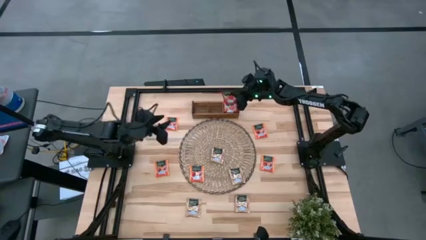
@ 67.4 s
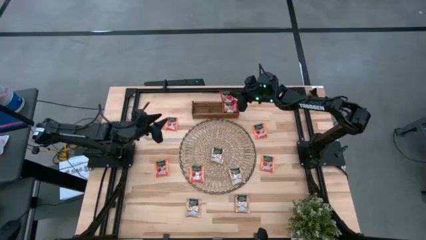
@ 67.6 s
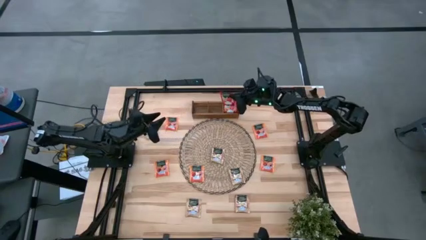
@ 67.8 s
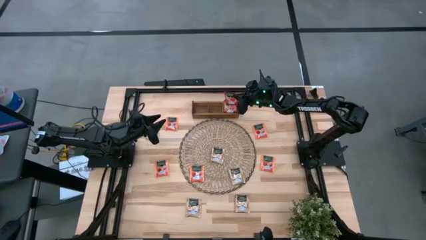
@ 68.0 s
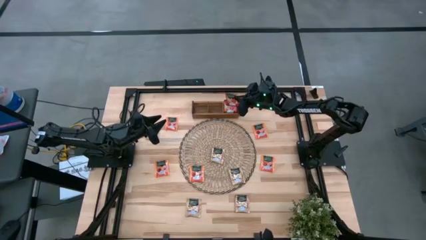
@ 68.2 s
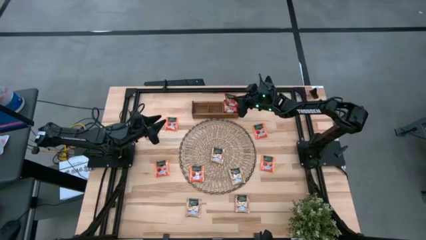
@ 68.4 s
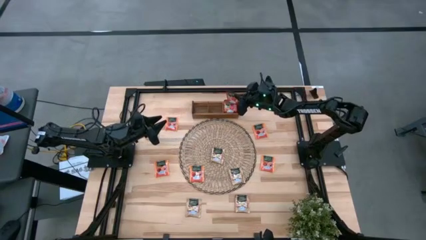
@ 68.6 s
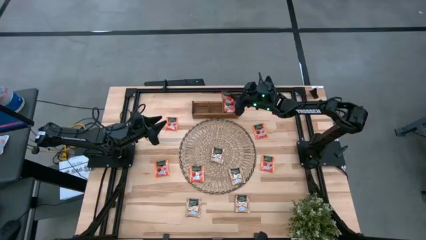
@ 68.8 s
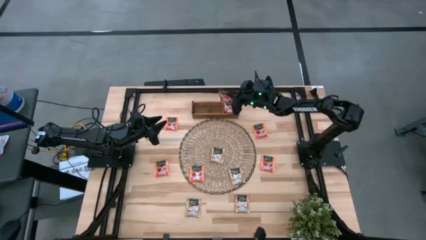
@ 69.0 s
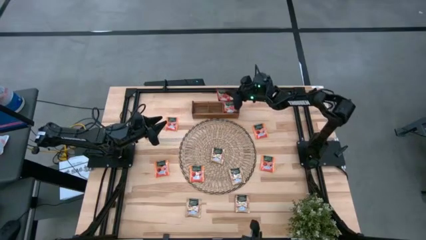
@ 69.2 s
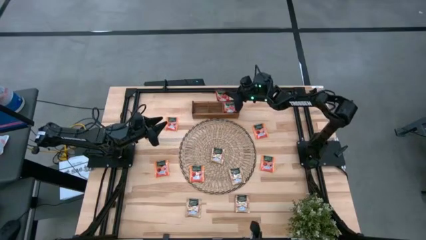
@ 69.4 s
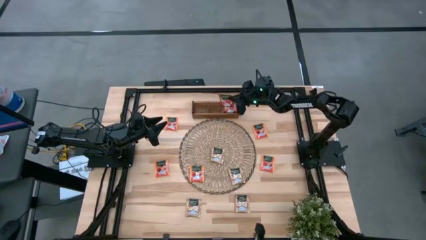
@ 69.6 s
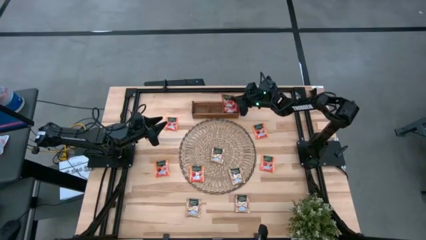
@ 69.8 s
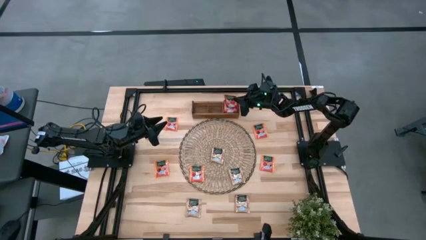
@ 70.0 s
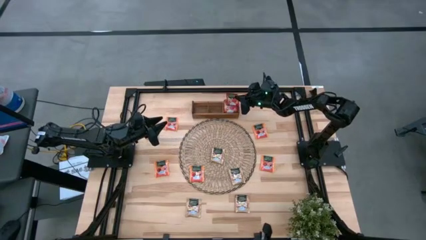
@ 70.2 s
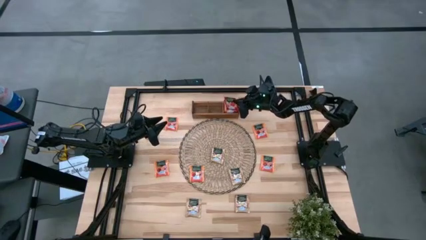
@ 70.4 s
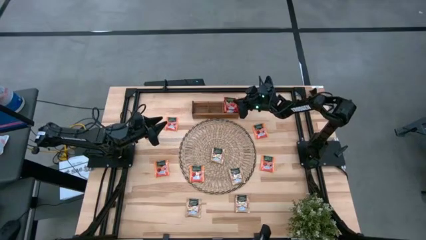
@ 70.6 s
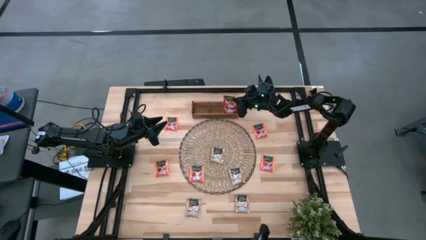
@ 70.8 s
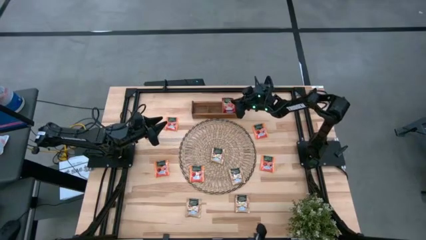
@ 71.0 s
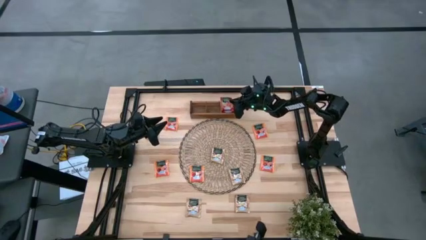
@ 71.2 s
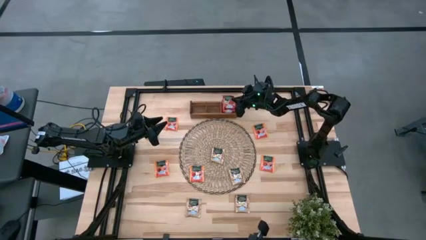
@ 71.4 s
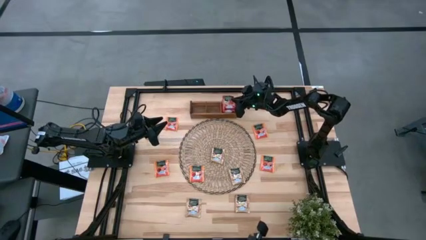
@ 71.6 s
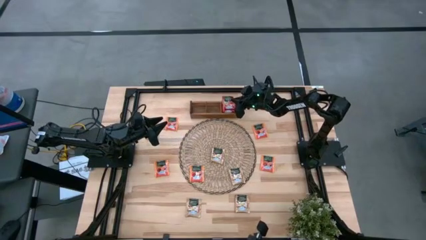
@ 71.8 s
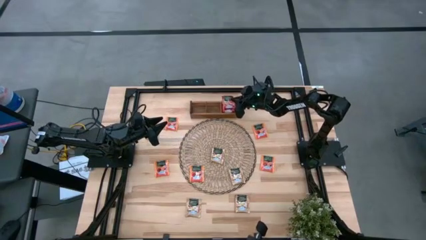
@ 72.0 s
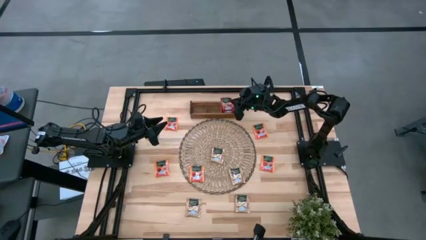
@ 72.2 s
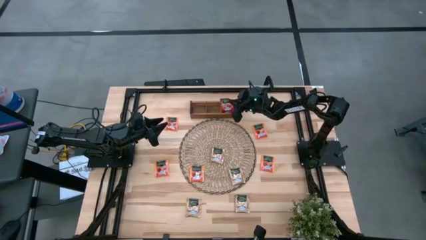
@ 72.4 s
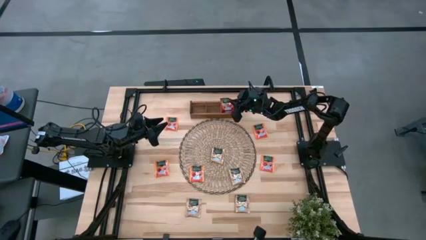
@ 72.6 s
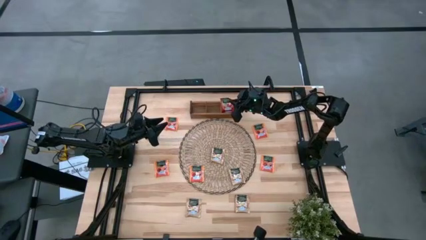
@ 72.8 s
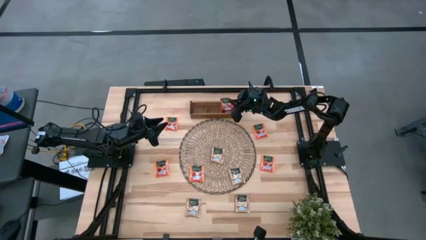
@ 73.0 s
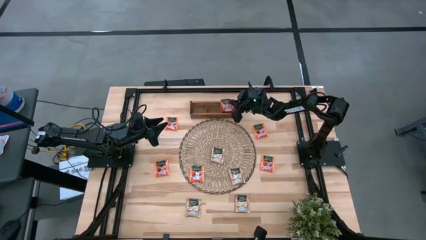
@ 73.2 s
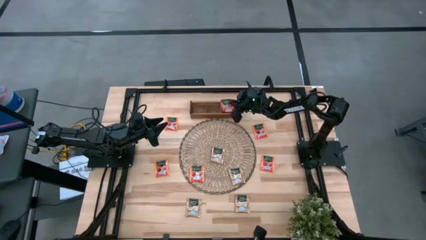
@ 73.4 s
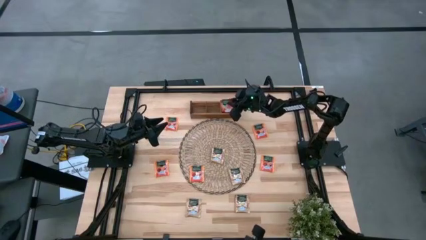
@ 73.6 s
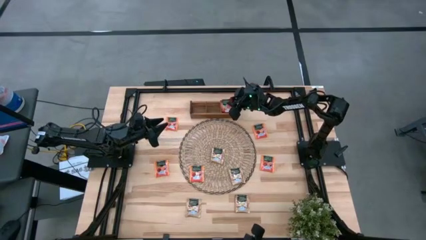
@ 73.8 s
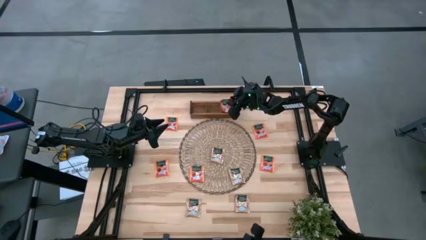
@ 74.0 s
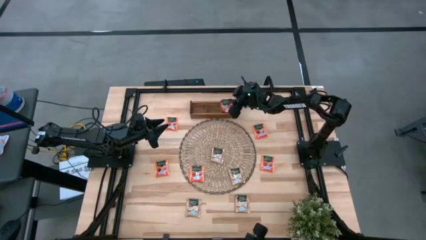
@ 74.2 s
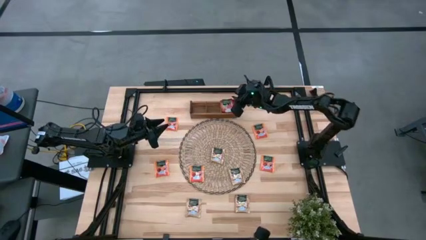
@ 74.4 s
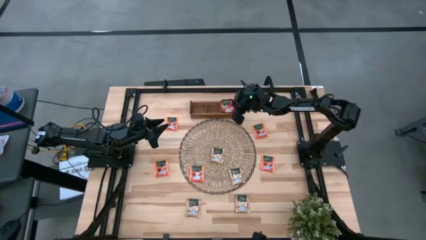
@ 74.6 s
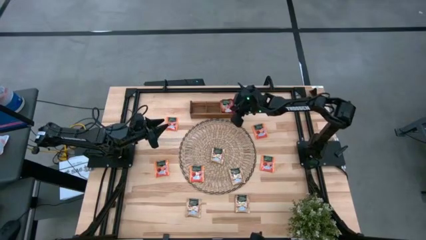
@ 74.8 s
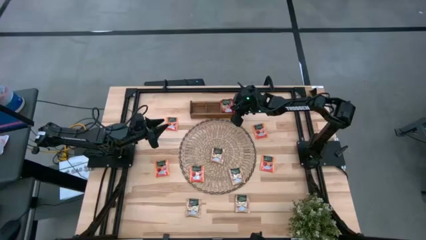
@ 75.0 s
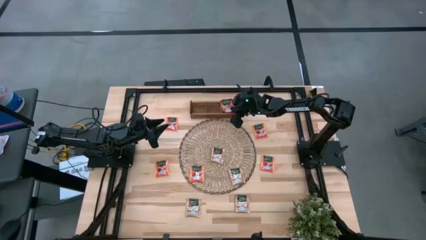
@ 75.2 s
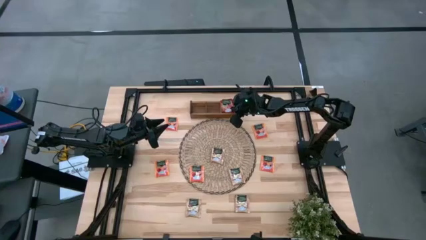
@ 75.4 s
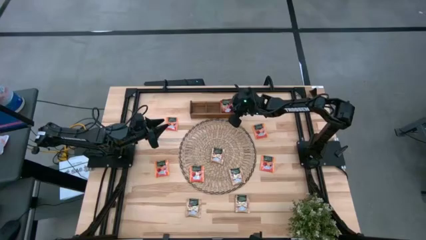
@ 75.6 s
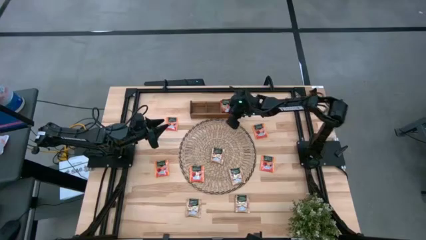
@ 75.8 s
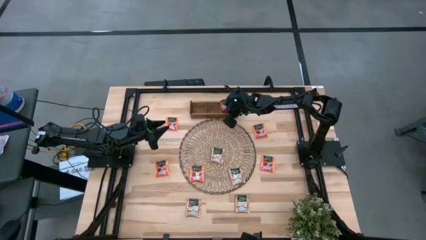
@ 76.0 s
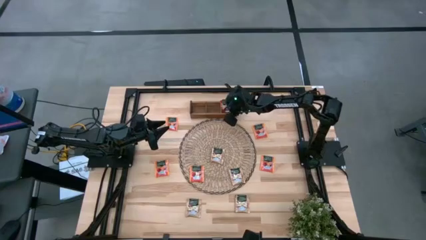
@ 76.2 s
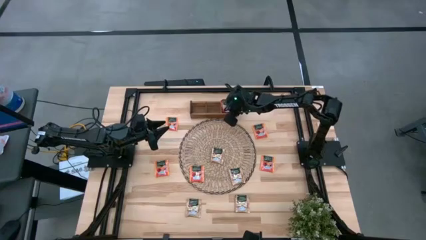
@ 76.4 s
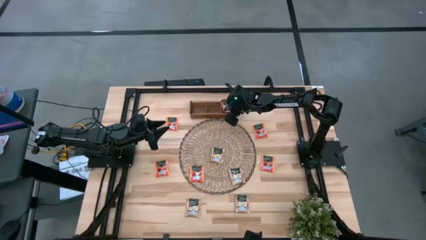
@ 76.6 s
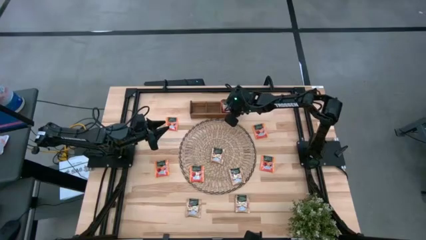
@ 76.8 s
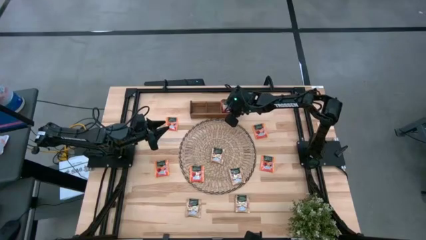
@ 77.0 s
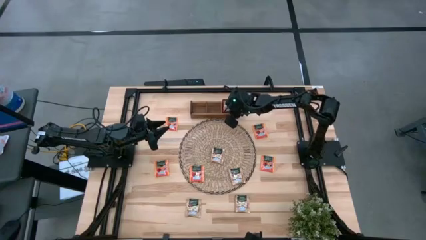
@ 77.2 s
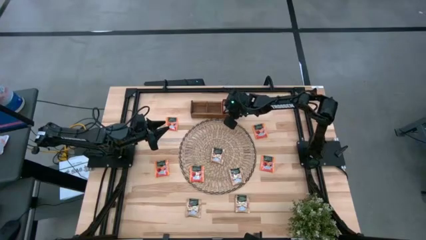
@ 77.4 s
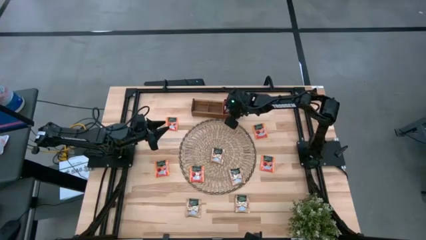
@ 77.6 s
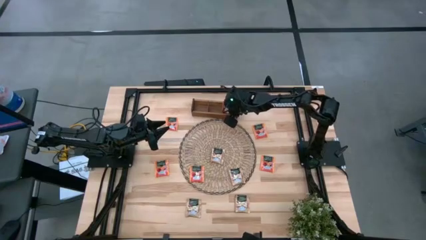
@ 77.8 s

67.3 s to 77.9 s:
Task: Pick & Place Tea
Put the red tea bag into the right section of the wooden organizer
